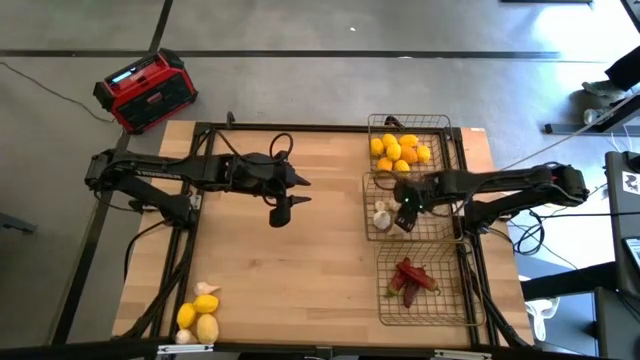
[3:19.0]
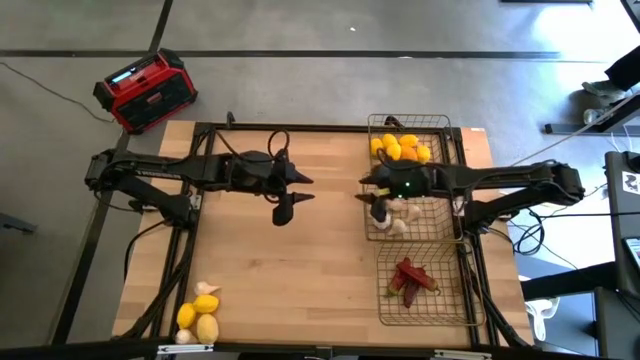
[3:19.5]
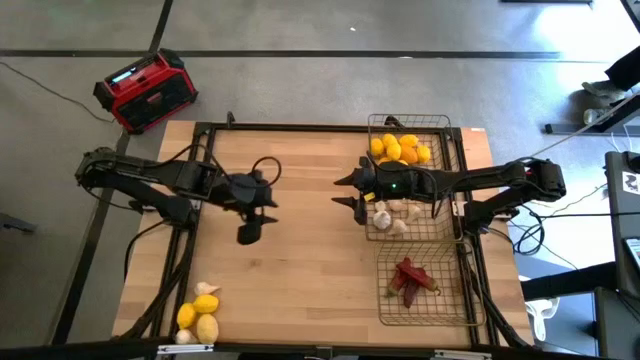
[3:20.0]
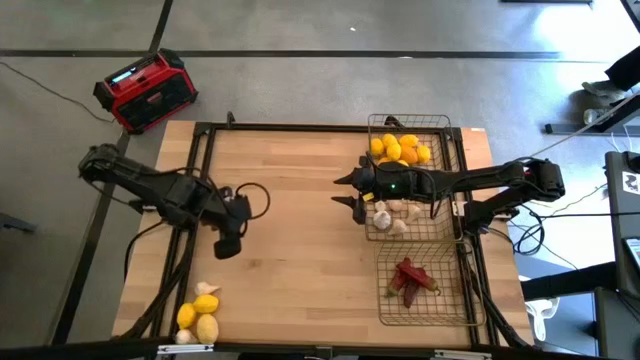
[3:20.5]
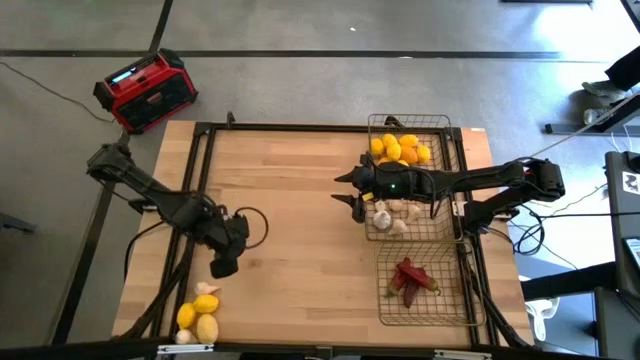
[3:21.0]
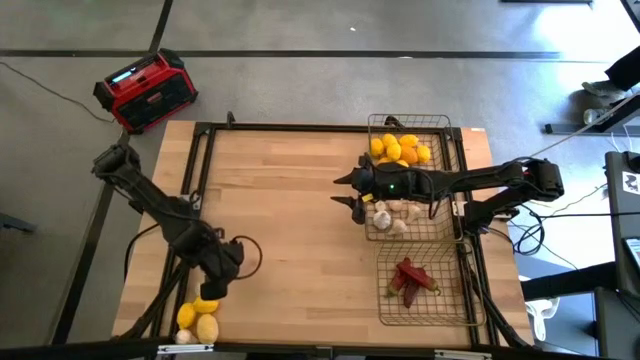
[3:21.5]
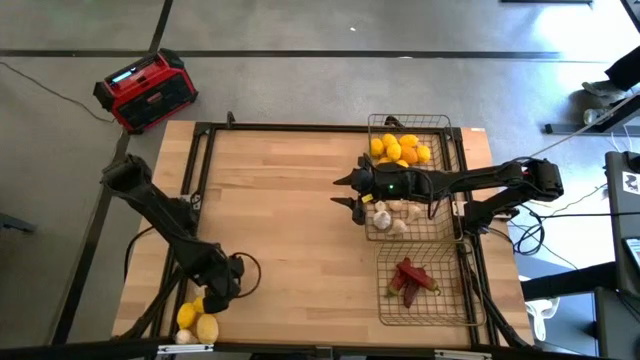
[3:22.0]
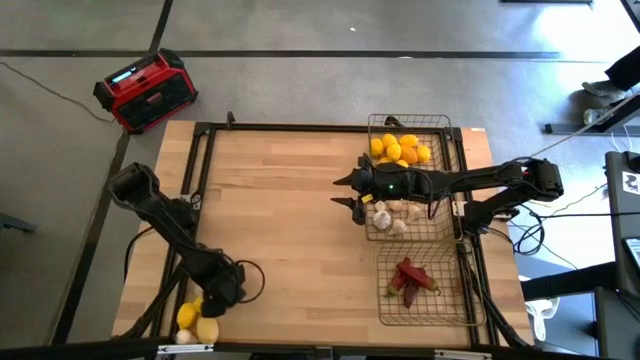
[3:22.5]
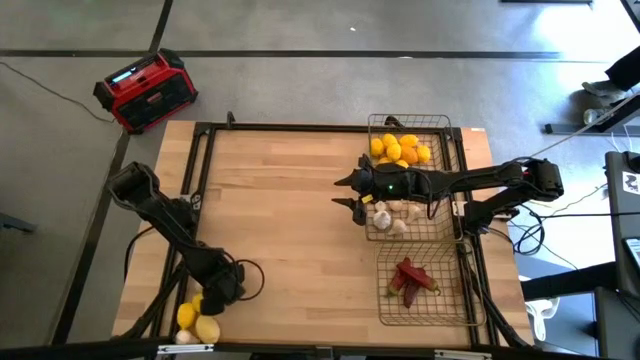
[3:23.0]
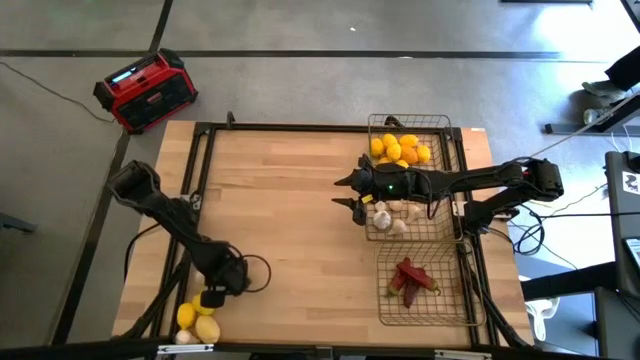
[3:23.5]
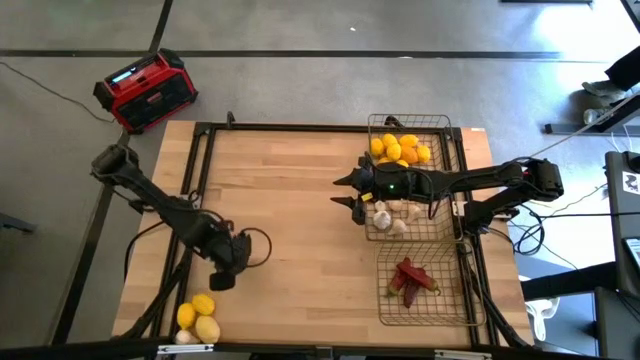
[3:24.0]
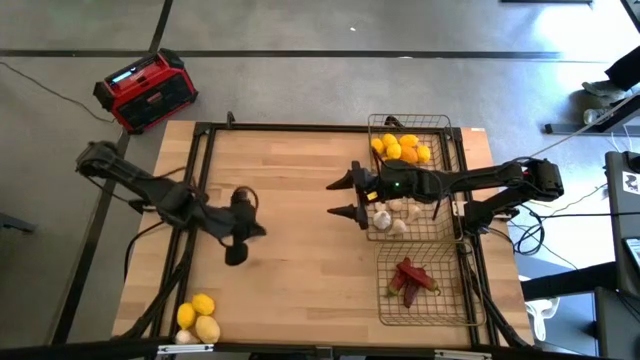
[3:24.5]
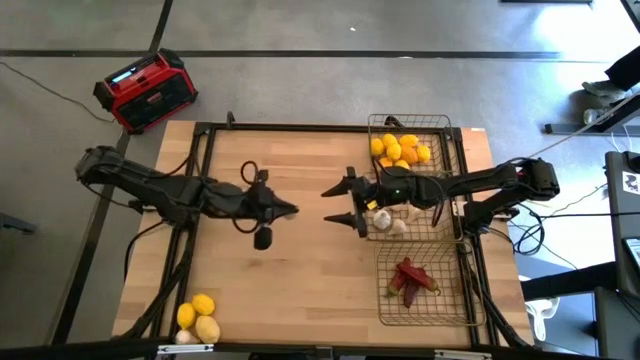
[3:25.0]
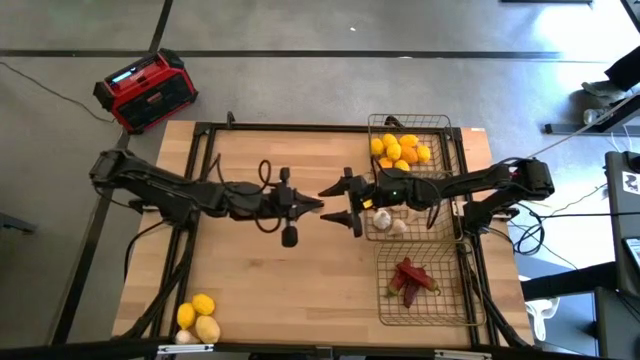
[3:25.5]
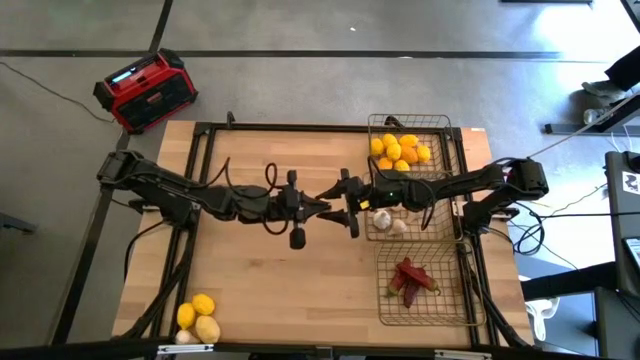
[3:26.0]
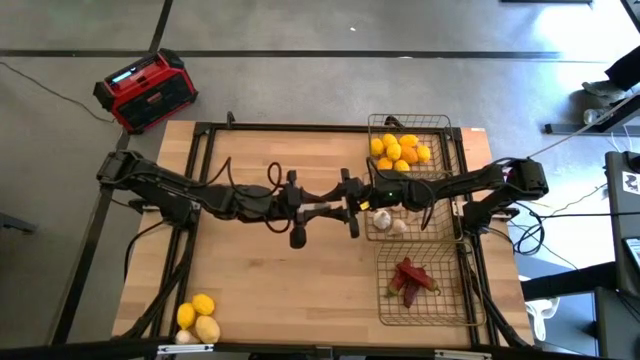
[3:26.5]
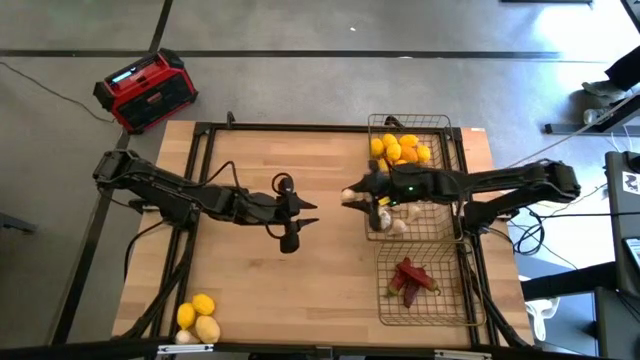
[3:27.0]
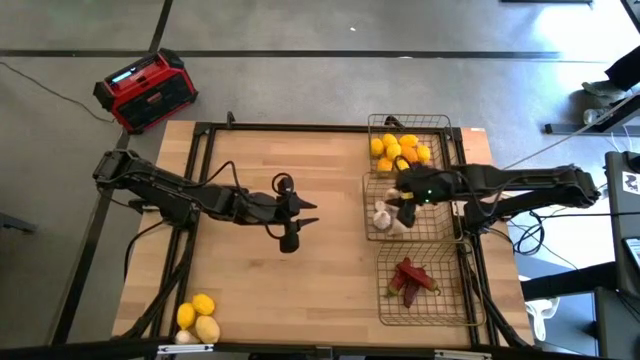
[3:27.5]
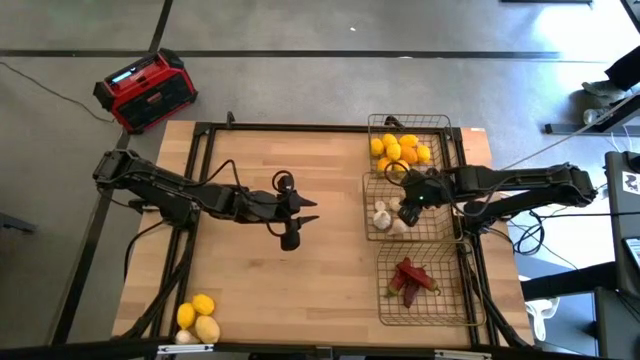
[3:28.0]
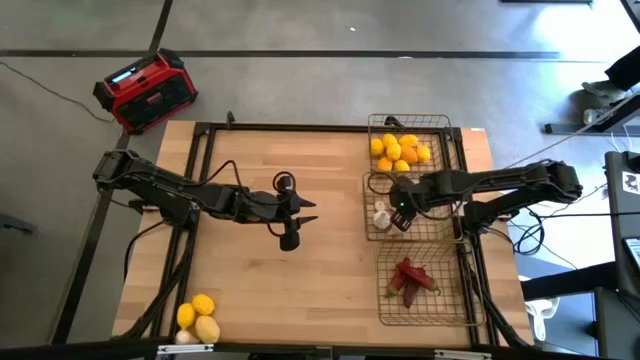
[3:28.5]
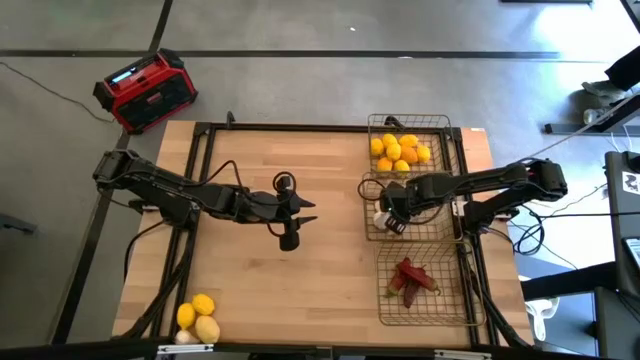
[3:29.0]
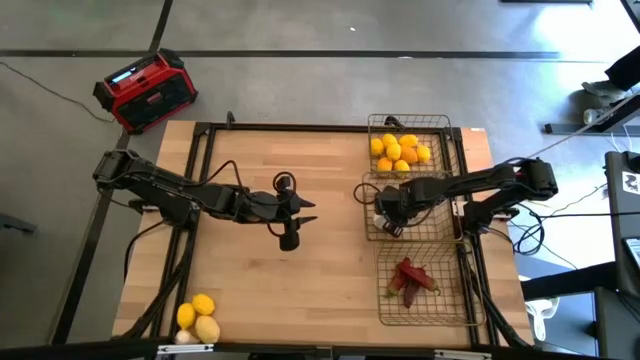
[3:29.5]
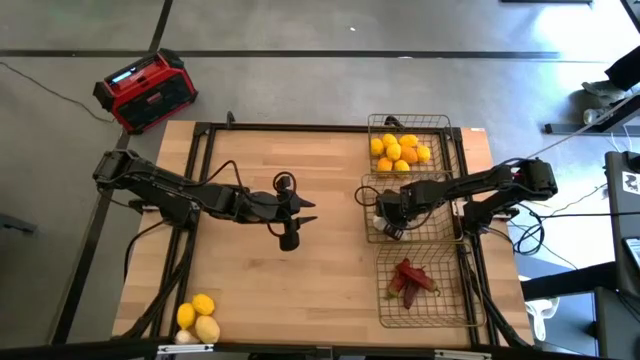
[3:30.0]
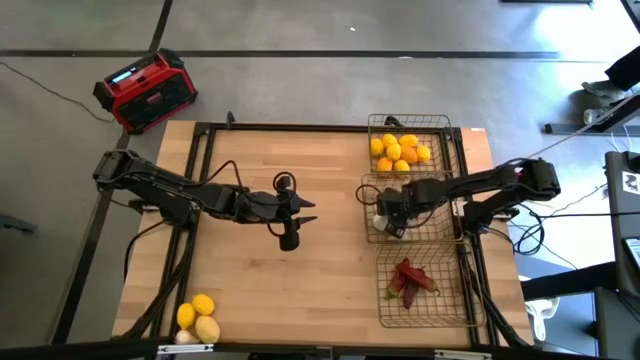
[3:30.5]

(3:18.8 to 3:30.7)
Task: Sort produce into baskets
Put the white garlic into the middle wire basket

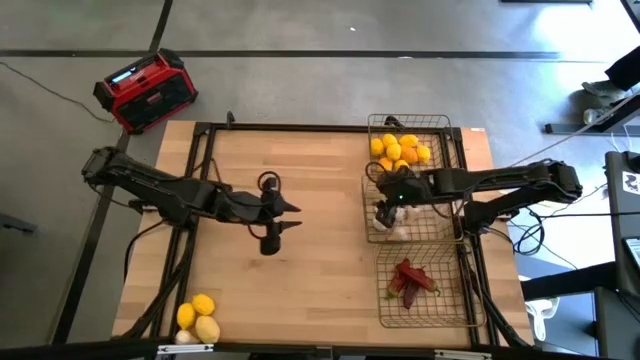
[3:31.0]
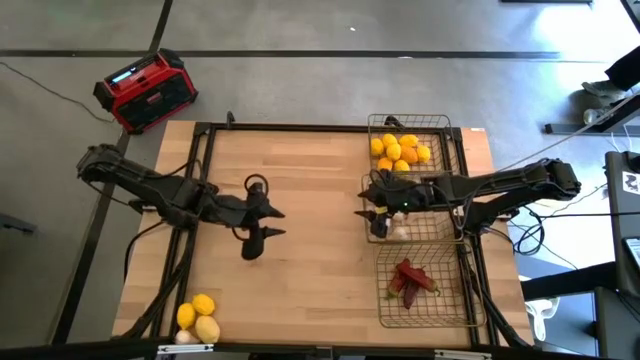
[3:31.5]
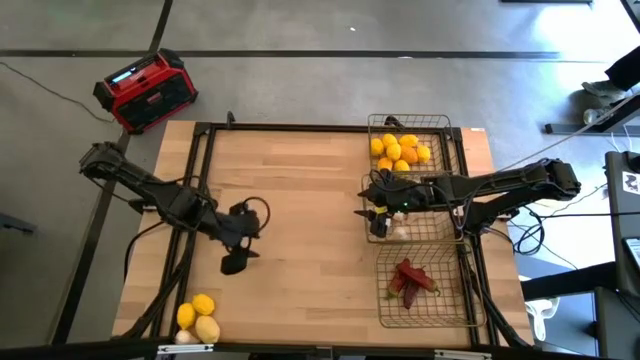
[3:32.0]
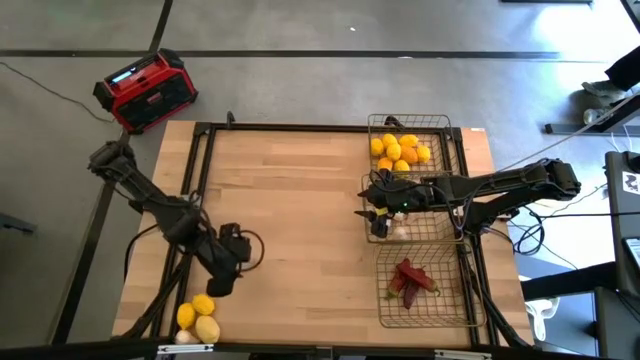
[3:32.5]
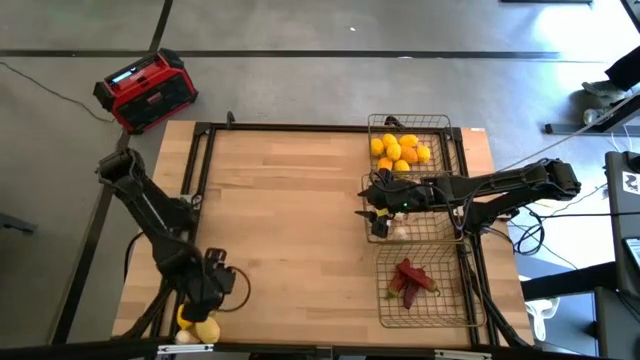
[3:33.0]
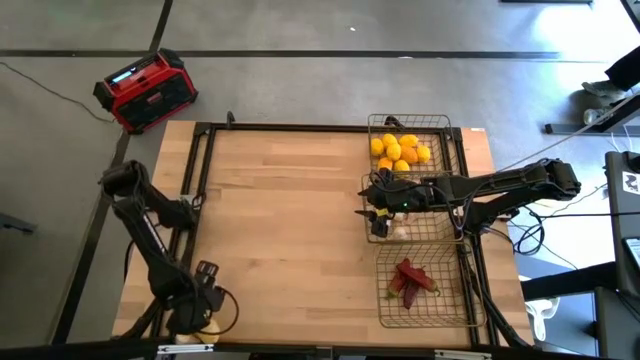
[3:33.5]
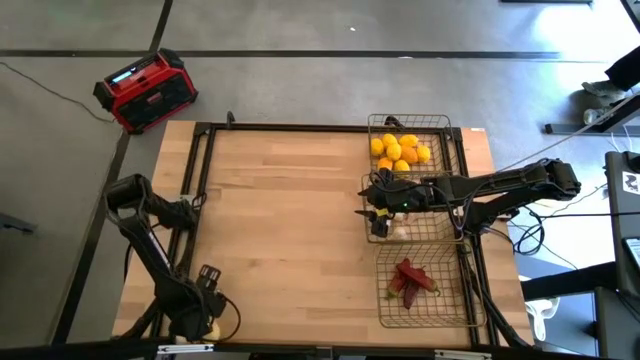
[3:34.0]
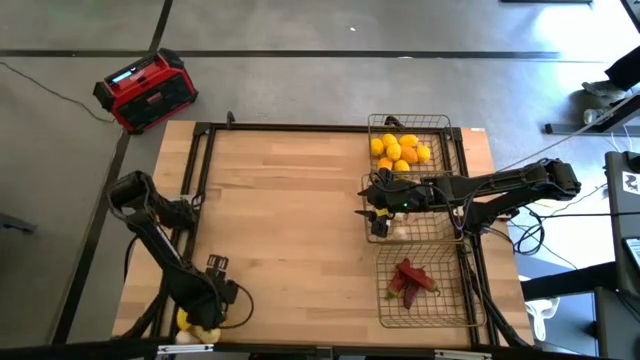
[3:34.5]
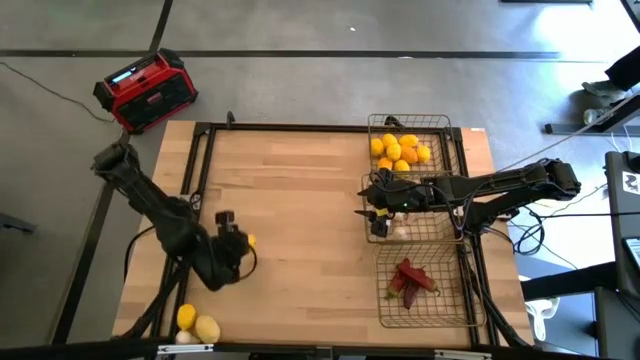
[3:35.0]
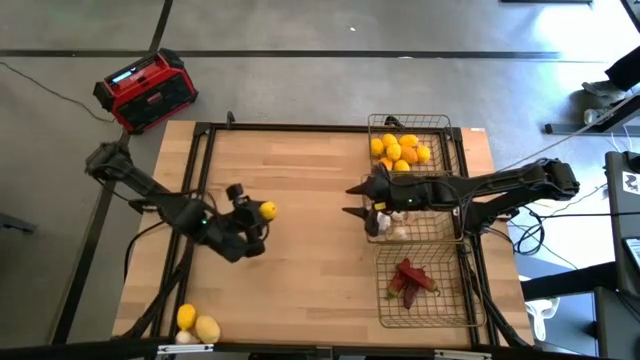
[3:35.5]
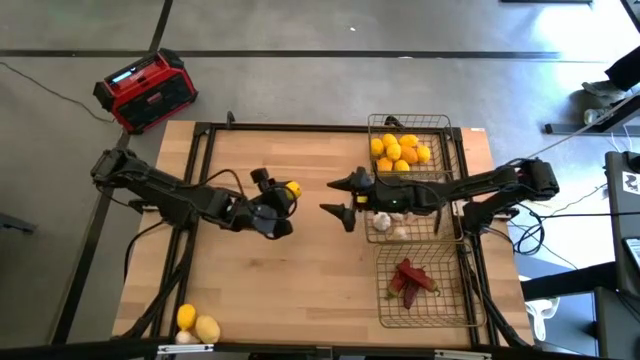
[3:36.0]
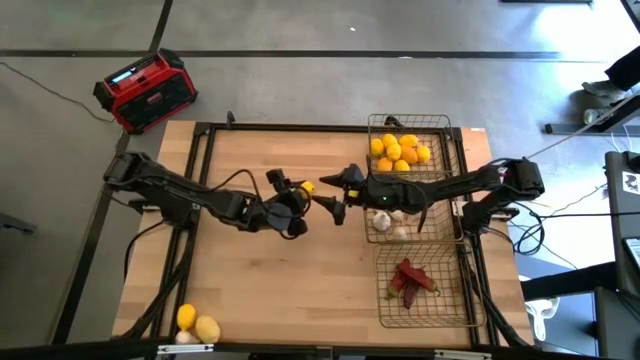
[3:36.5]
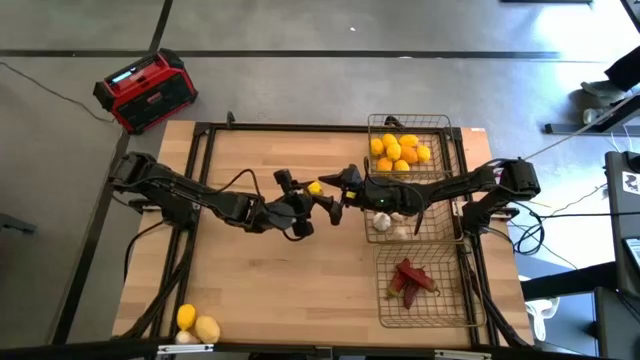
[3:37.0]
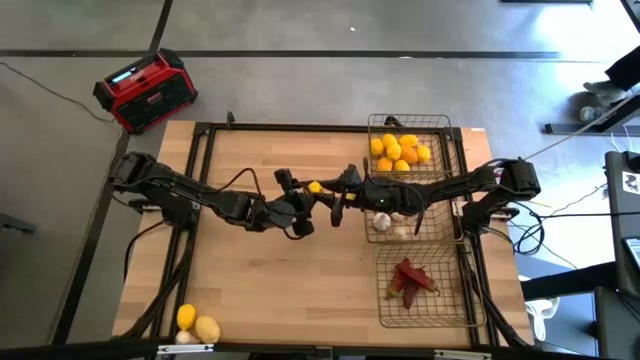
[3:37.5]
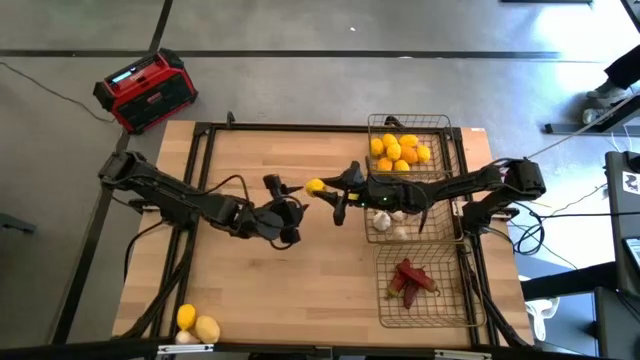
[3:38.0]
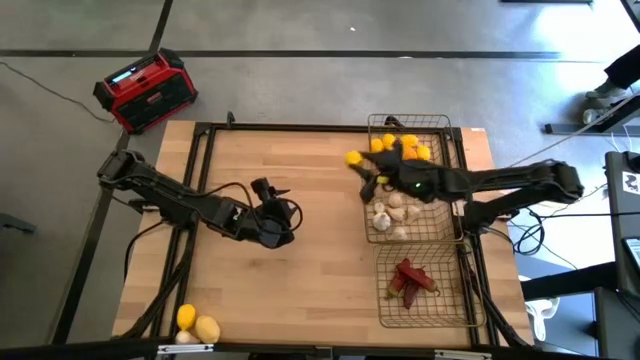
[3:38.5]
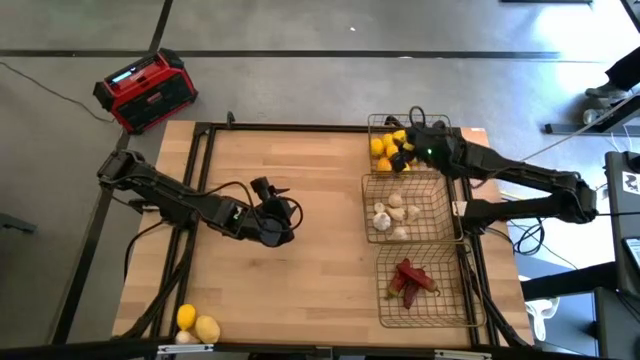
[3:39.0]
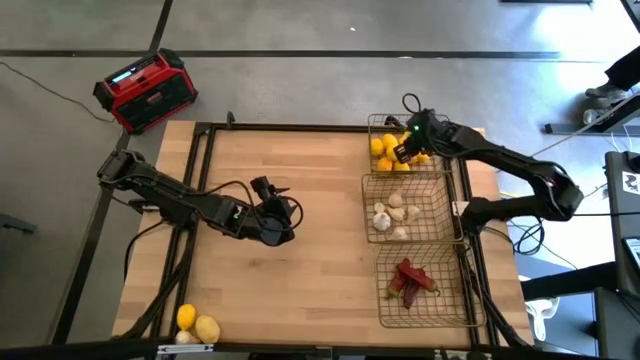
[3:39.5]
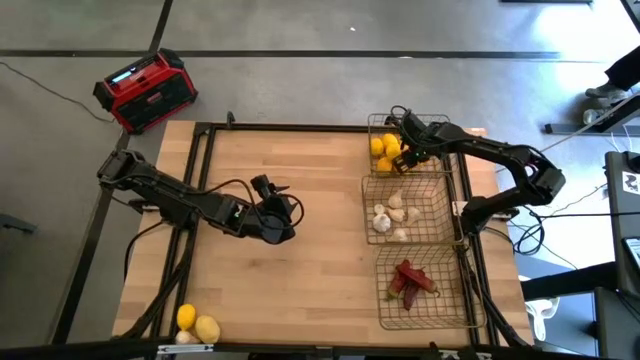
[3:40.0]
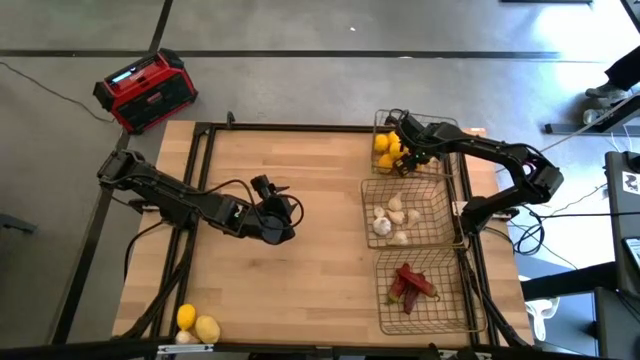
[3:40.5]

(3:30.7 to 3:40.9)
Put the yellow lemon into the top wire basket
